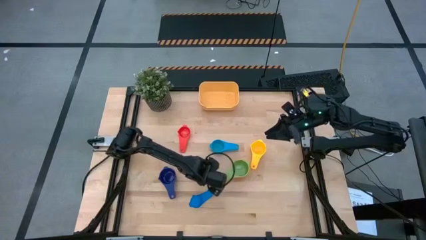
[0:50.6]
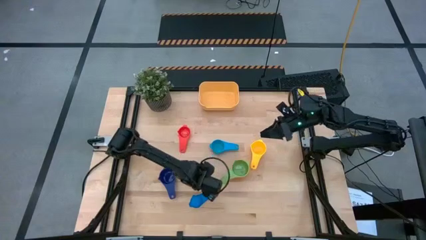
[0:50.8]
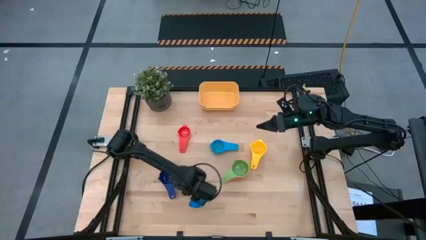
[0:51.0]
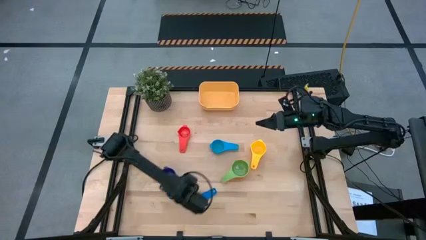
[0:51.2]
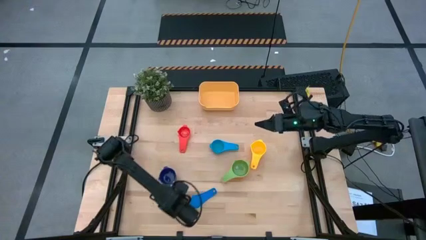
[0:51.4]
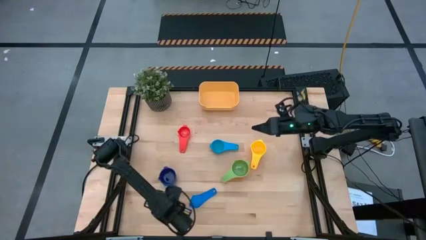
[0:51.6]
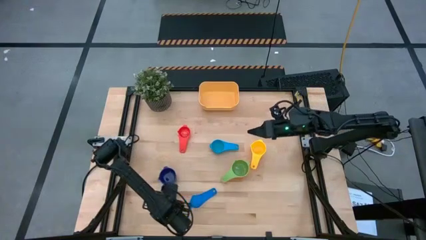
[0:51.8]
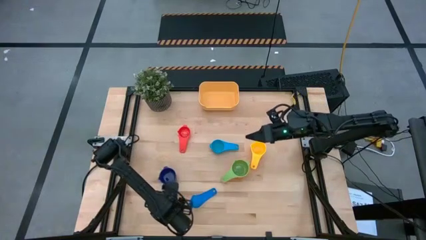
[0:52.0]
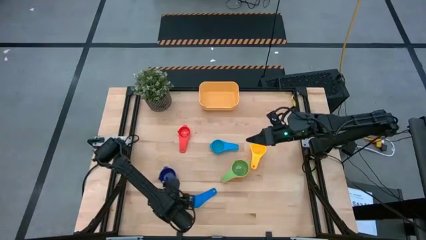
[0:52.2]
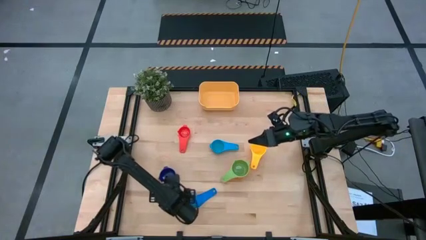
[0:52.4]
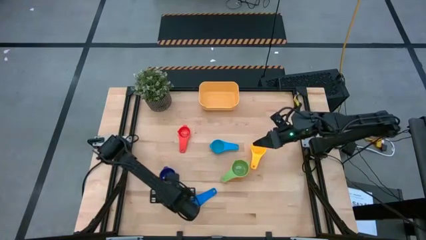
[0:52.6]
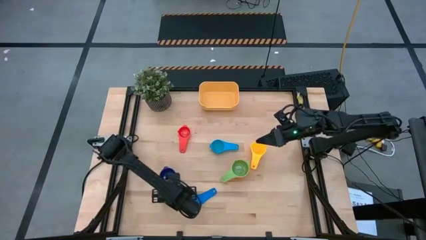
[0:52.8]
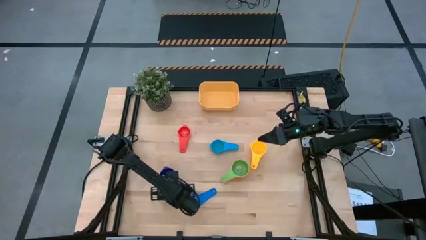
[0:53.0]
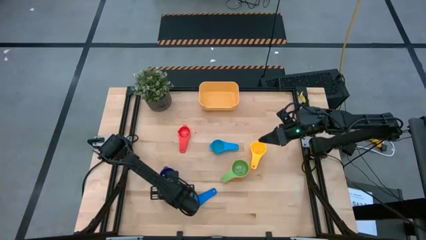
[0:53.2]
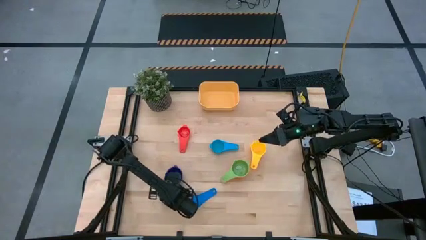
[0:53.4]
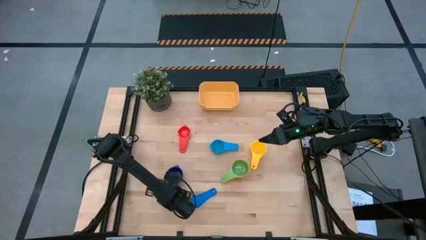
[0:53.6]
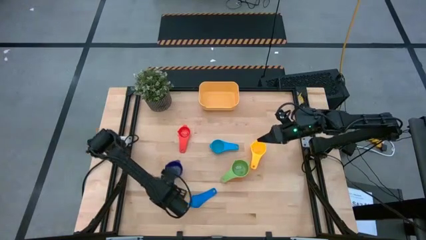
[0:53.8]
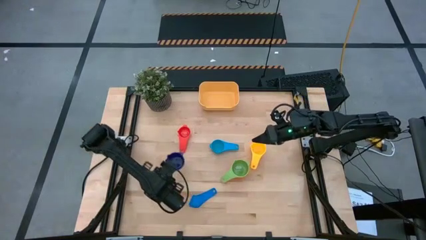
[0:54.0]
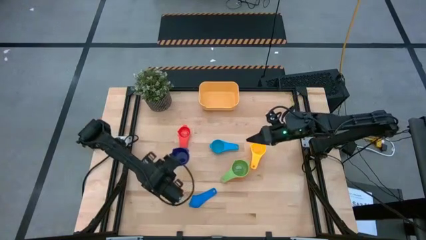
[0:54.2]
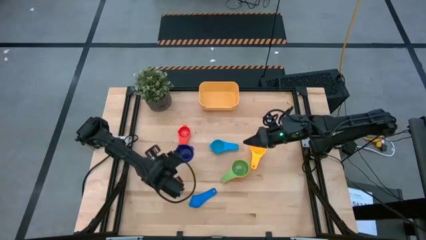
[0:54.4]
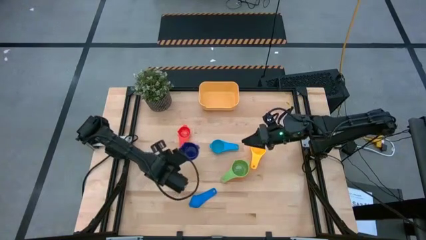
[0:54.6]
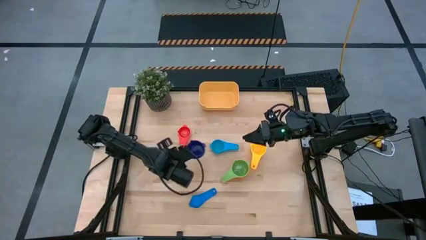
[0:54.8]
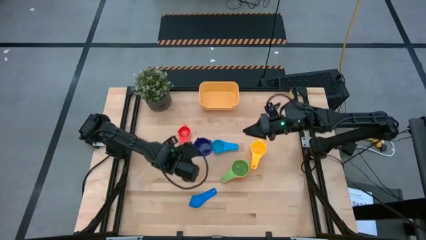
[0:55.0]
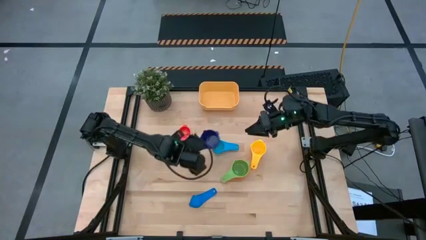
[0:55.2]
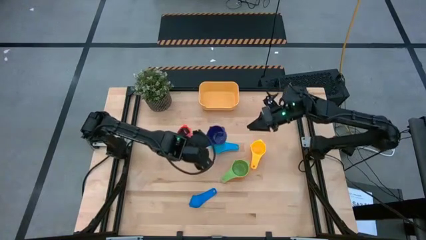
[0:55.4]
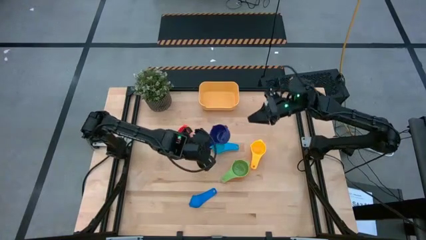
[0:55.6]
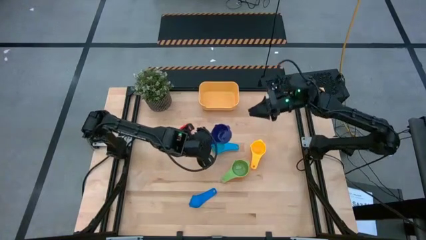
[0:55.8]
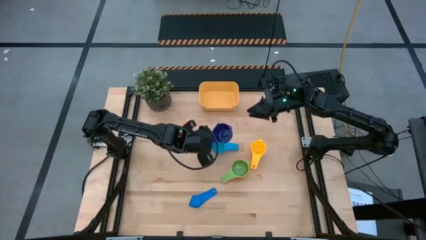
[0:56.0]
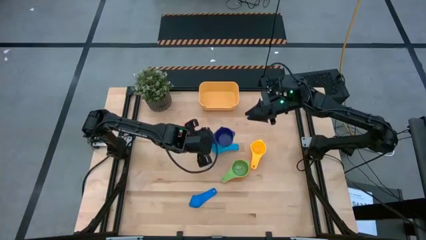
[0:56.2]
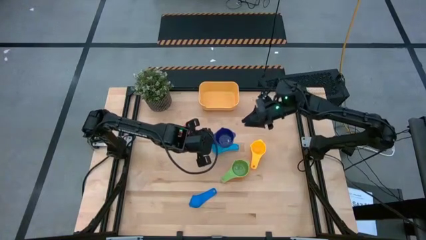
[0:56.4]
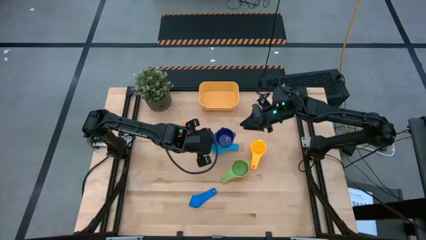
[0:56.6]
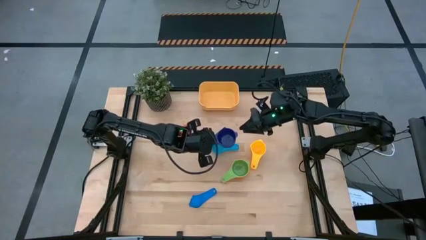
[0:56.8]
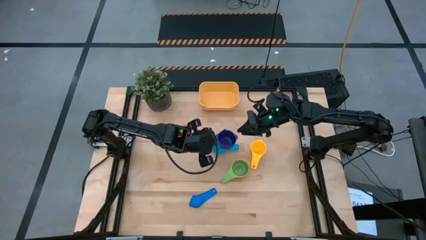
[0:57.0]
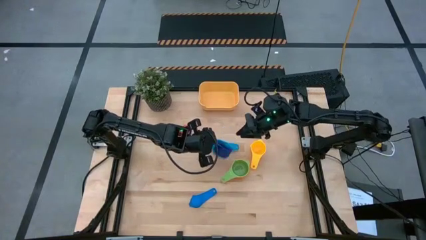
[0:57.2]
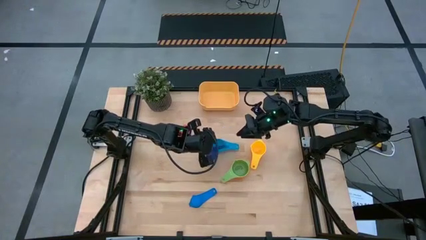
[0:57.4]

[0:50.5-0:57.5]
Task: Nest measuring cups in basket
Stack the dark blue measuring cup on top of the green measuring cup

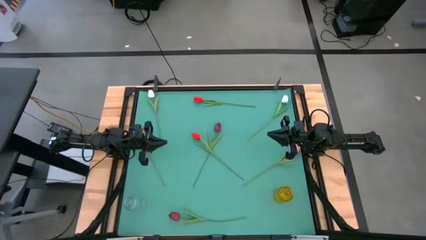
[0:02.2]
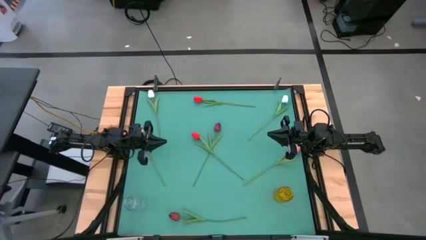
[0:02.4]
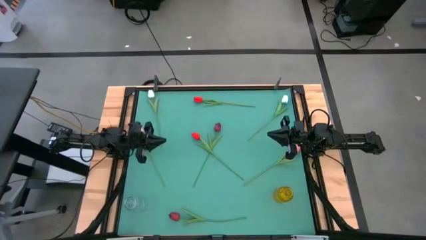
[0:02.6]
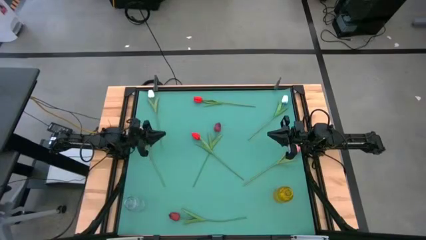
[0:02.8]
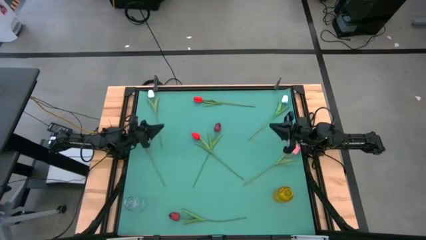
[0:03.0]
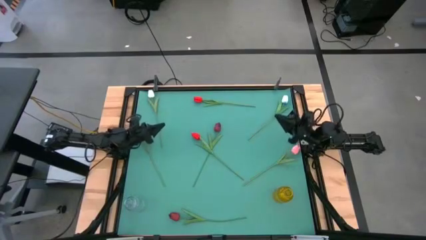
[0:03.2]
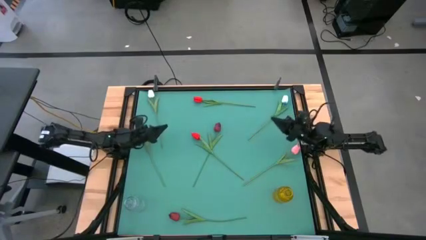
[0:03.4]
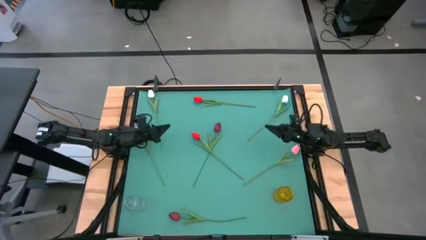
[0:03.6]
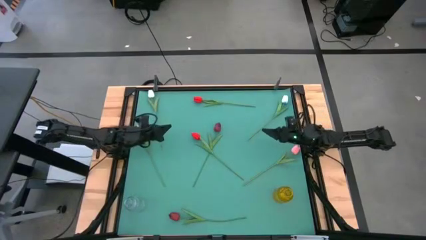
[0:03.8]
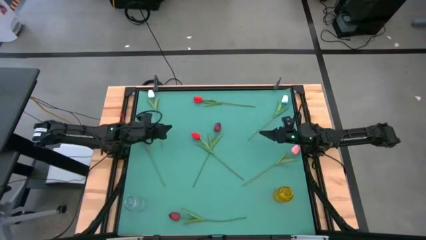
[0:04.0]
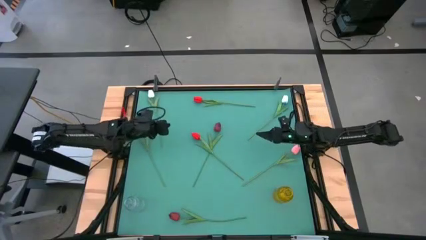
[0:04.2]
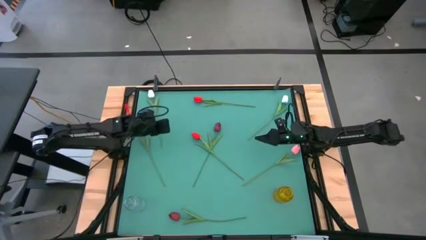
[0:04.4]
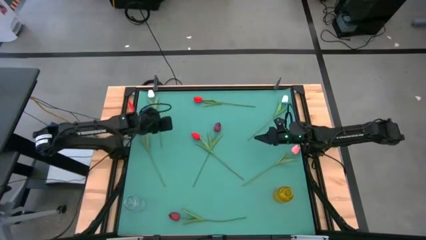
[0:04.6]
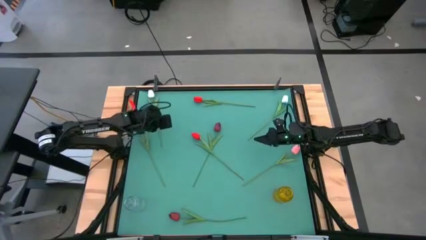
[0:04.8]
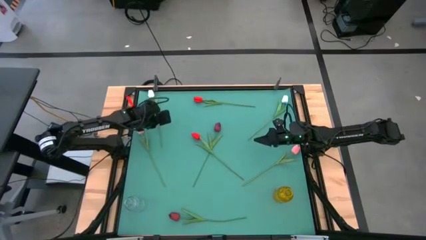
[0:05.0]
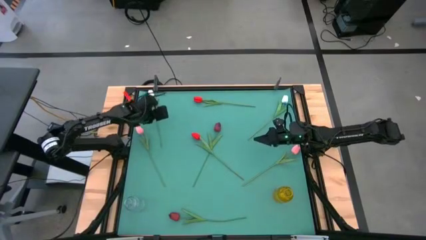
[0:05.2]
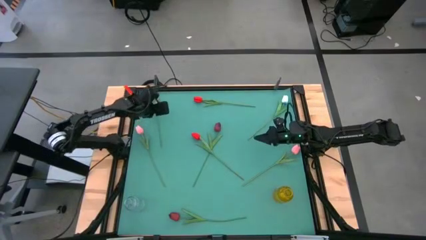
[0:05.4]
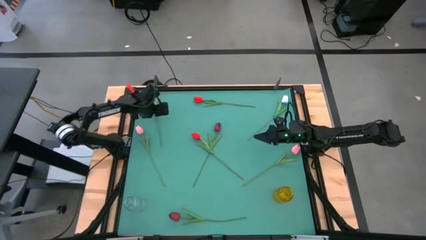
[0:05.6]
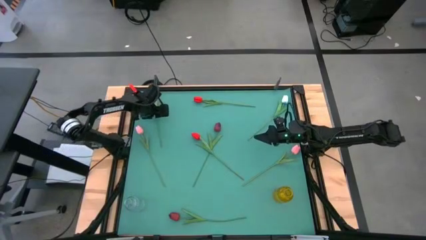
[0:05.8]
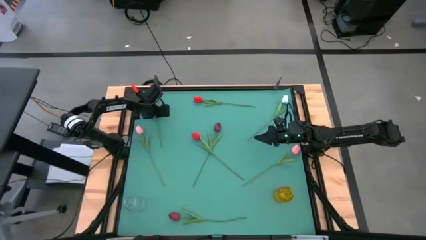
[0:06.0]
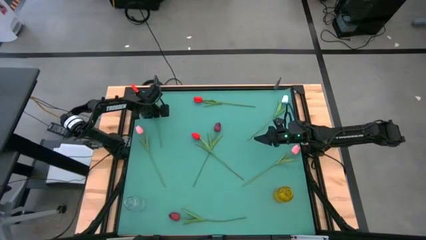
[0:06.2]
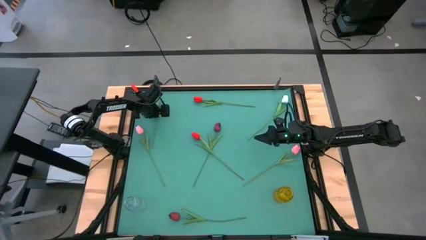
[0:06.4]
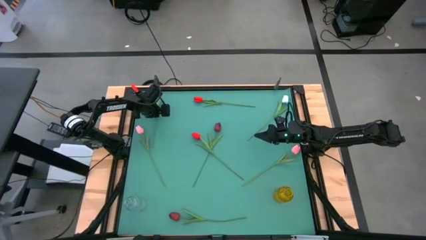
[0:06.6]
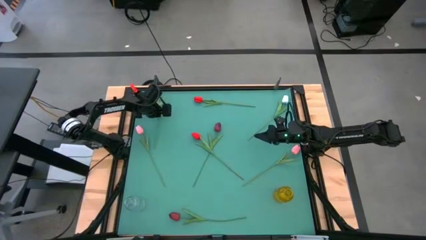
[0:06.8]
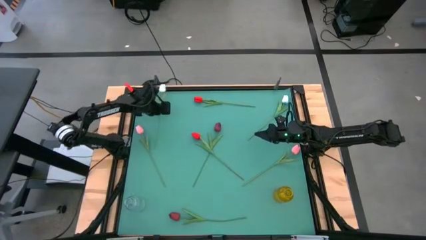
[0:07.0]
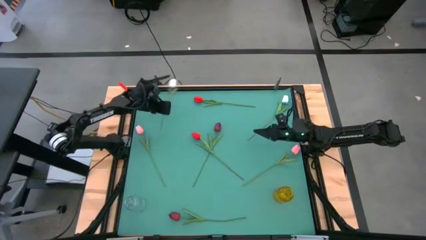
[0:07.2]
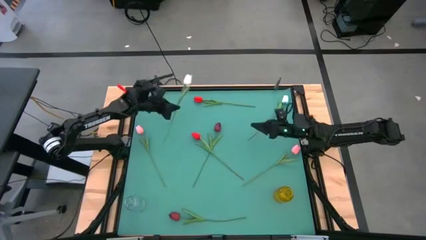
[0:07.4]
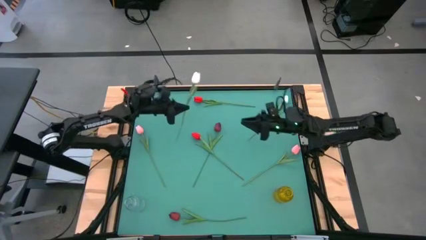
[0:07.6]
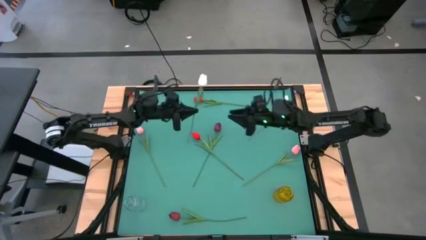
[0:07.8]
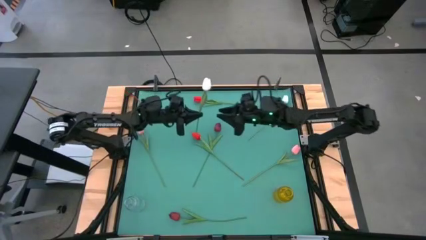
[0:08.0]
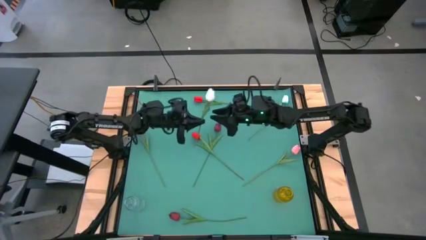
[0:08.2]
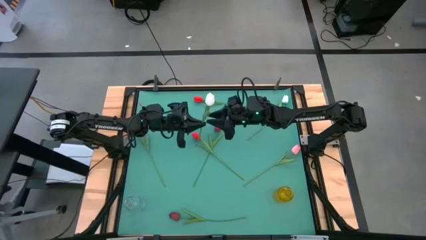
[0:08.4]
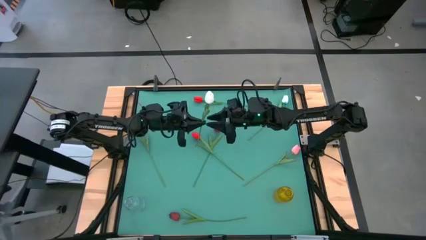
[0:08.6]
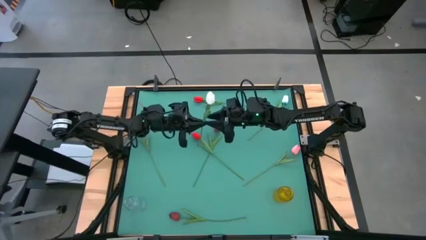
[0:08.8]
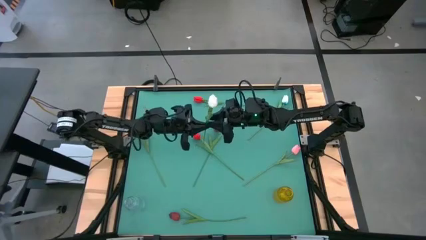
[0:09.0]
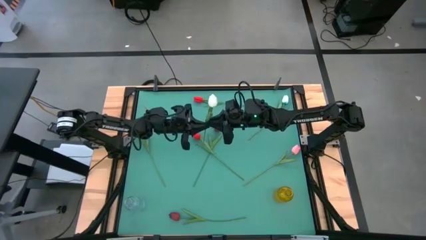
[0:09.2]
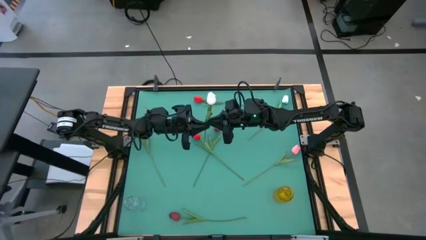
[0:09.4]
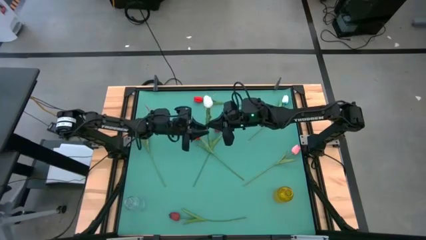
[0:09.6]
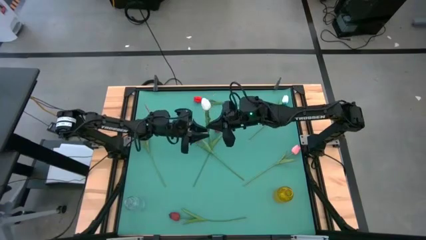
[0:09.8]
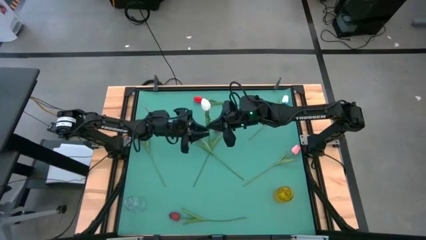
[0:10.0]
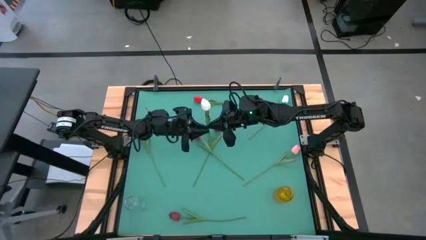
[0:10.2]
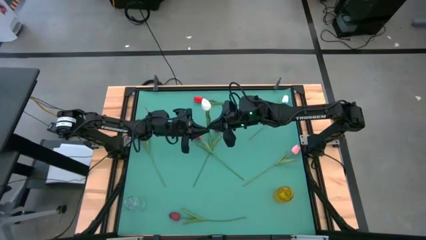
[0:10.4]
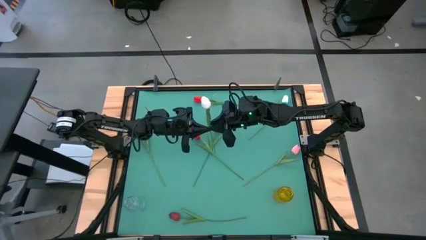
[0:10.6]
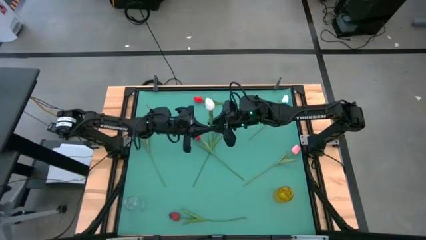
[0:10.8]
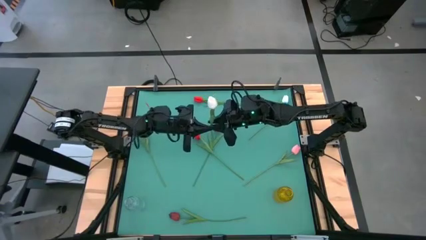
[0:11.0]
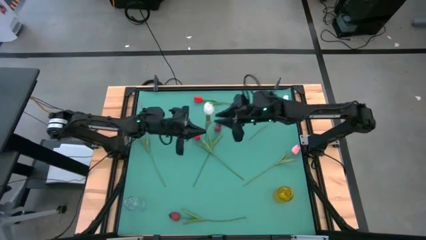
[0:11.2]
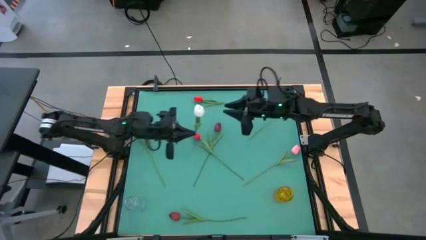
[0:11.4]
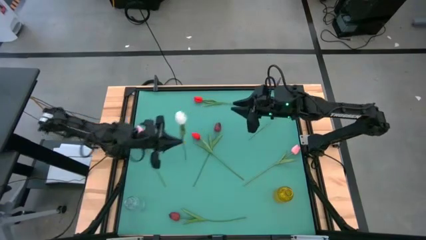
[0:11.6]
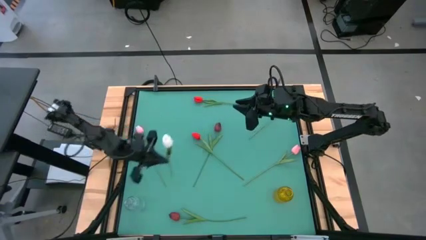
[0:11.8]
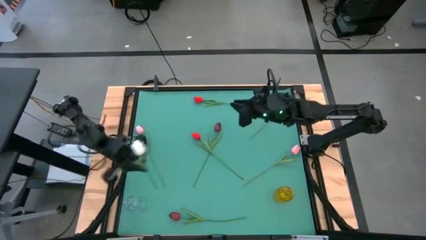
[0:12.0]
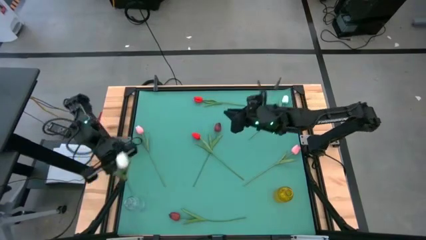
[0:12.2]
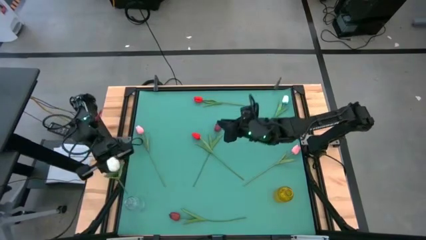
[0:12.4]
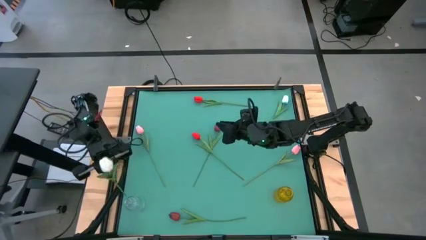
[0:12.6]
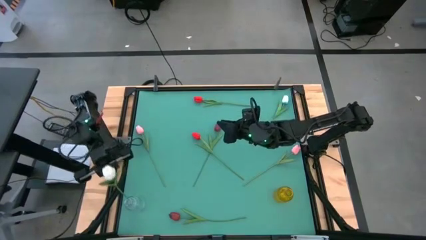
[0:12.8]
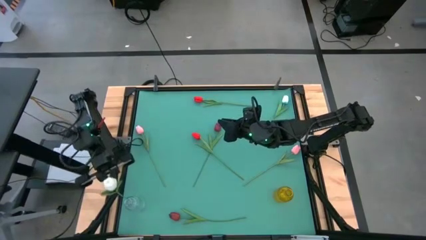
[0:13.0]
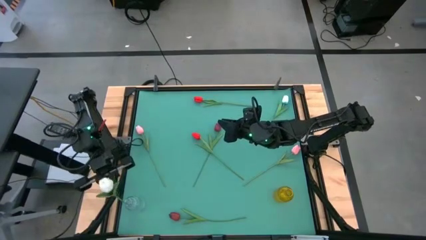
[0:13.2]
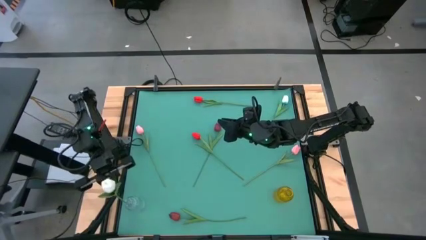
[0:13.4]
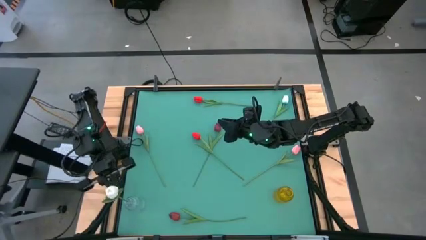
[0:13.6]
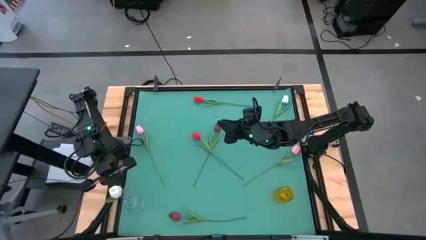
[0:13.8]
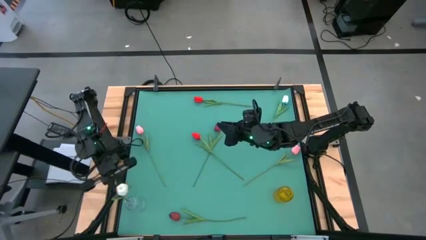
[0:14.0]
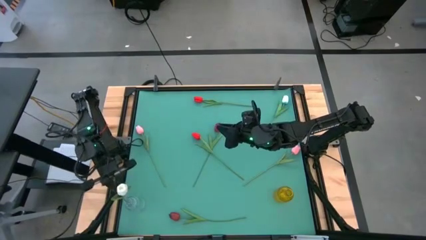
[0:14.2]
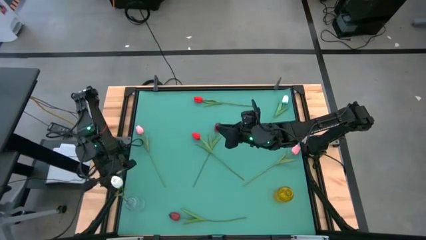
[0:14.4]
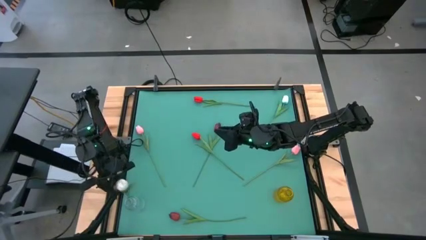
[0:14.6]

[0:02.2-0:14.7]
Task: Sort flowers into vase by color
Put the left white flower into the transparent vase
